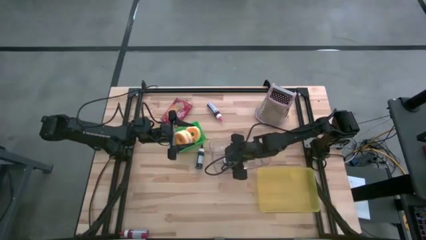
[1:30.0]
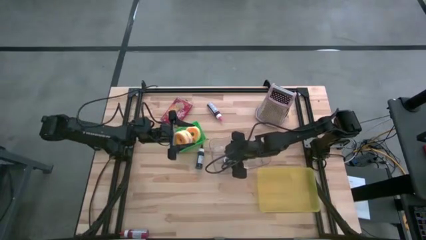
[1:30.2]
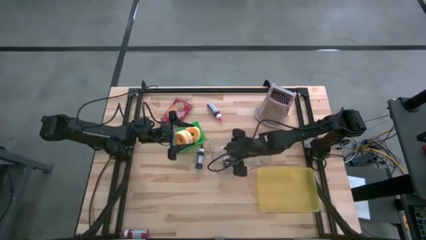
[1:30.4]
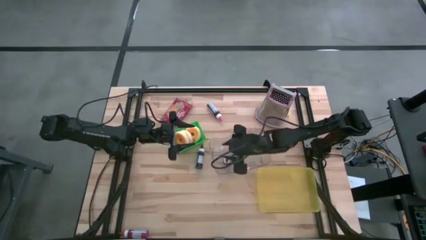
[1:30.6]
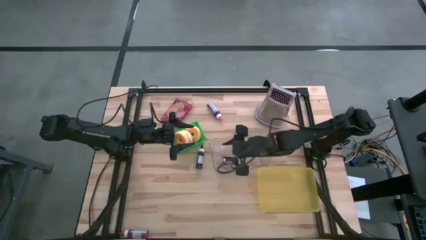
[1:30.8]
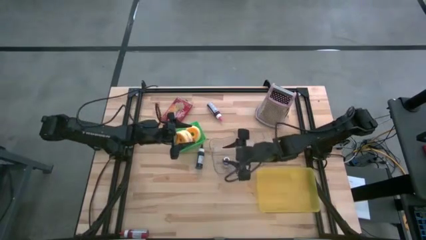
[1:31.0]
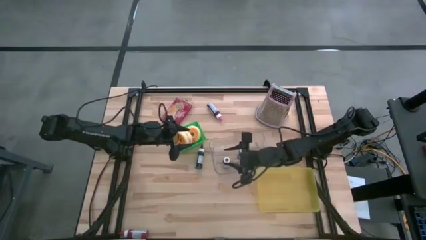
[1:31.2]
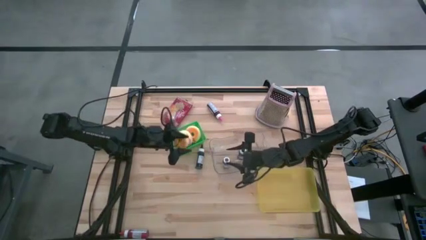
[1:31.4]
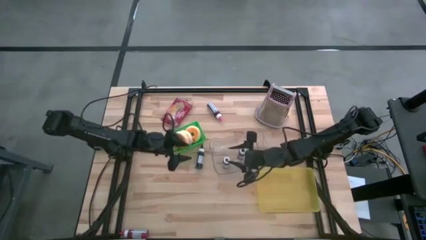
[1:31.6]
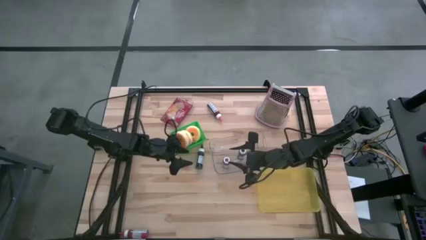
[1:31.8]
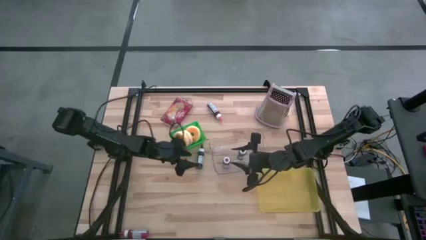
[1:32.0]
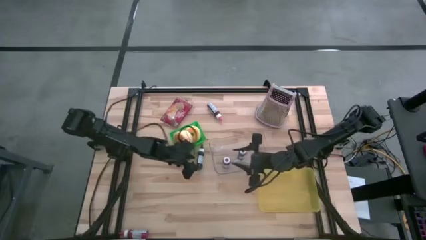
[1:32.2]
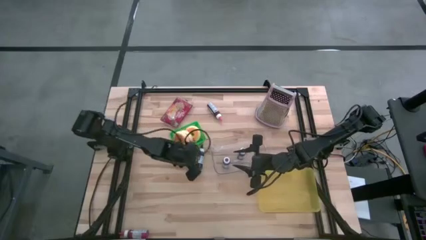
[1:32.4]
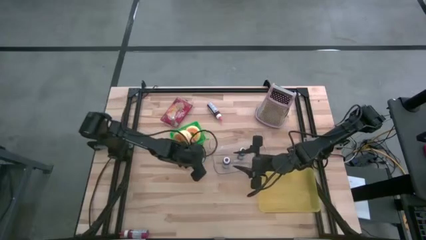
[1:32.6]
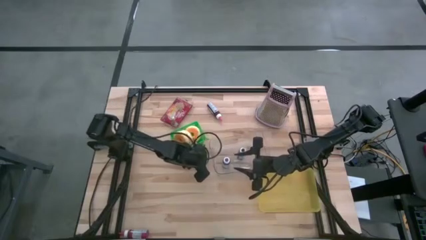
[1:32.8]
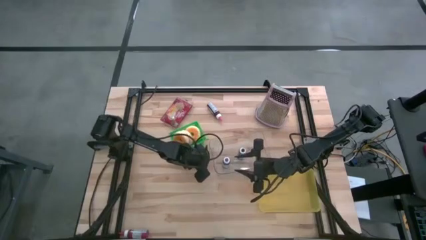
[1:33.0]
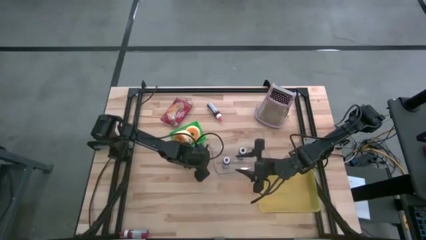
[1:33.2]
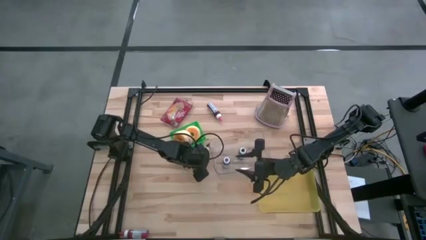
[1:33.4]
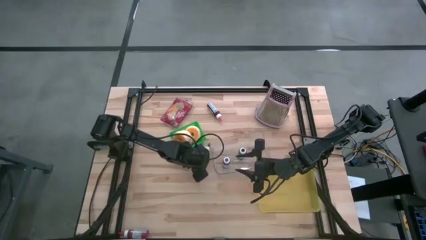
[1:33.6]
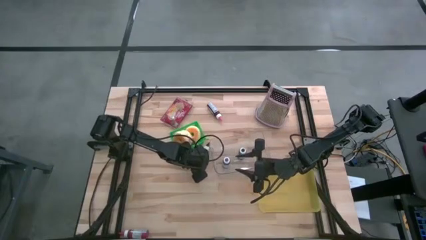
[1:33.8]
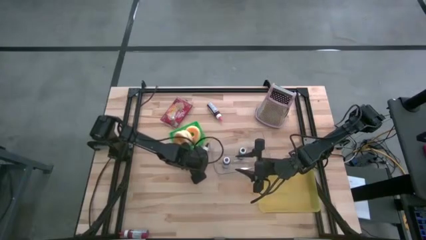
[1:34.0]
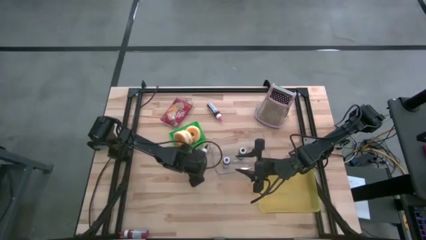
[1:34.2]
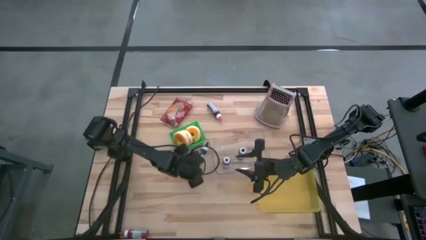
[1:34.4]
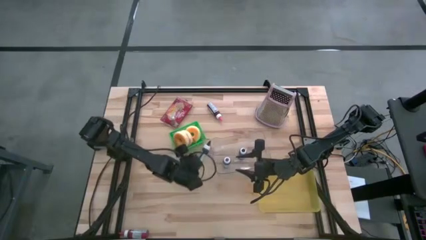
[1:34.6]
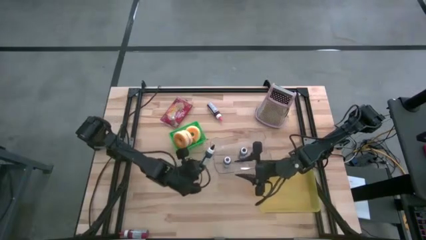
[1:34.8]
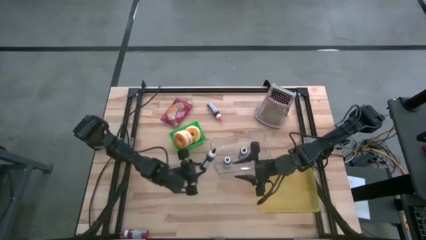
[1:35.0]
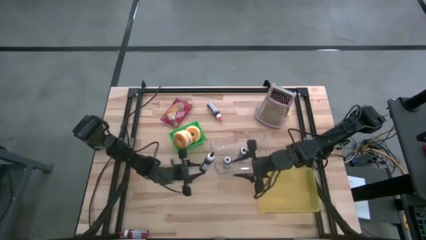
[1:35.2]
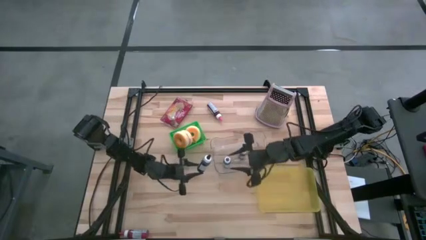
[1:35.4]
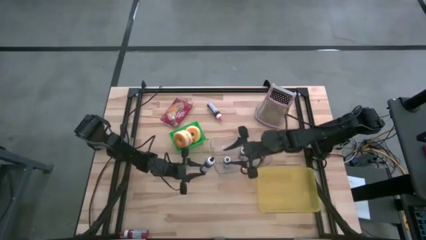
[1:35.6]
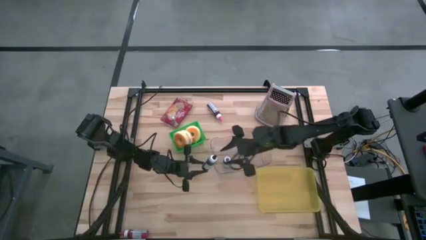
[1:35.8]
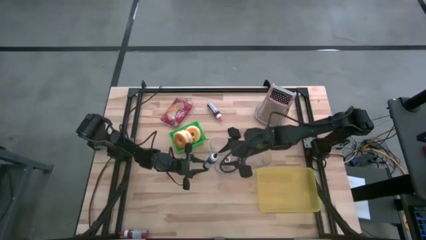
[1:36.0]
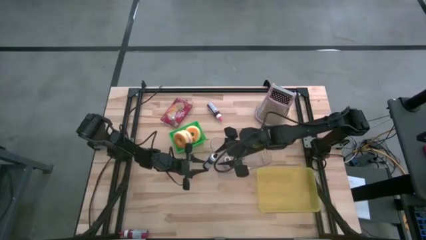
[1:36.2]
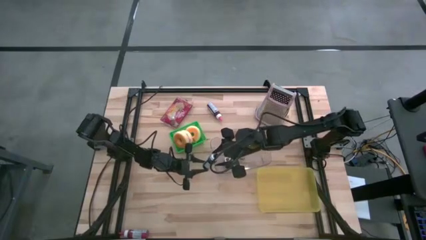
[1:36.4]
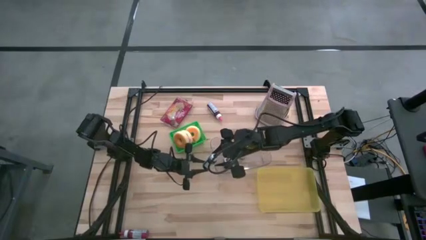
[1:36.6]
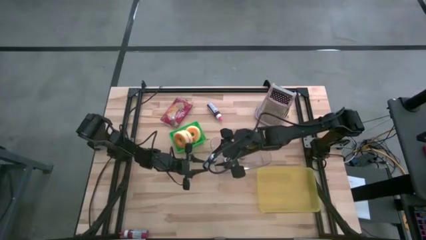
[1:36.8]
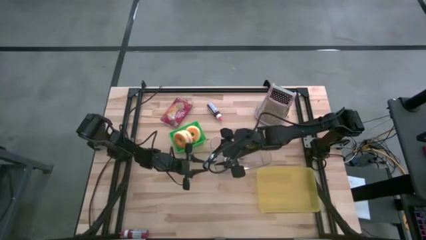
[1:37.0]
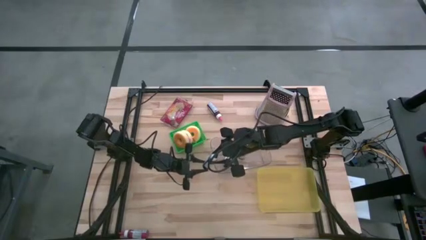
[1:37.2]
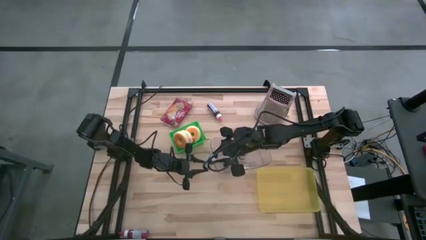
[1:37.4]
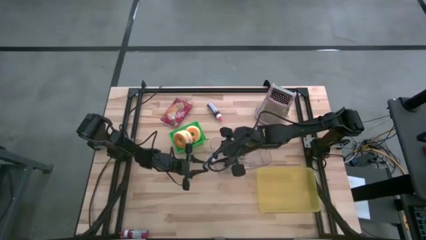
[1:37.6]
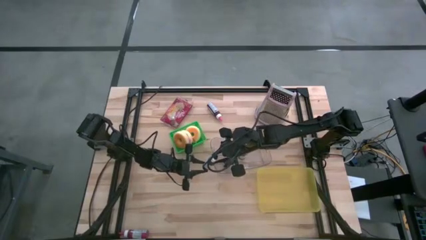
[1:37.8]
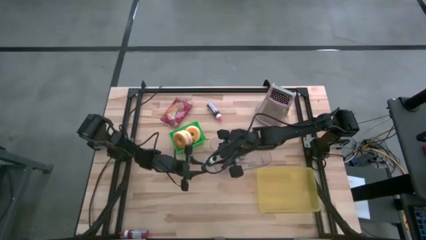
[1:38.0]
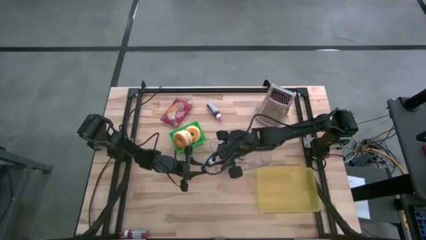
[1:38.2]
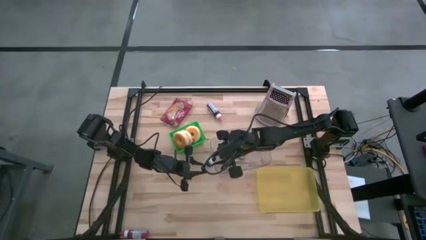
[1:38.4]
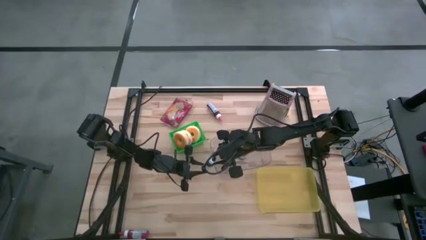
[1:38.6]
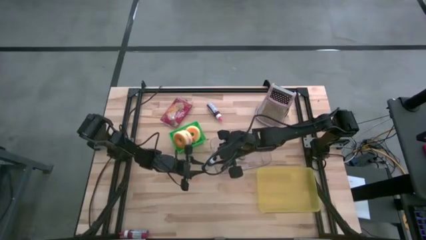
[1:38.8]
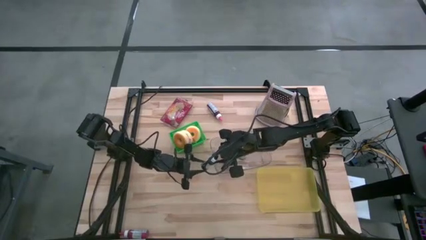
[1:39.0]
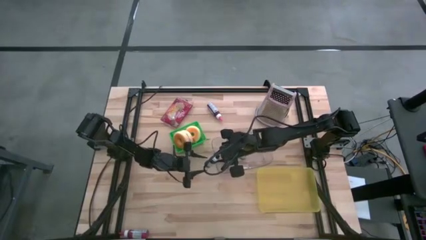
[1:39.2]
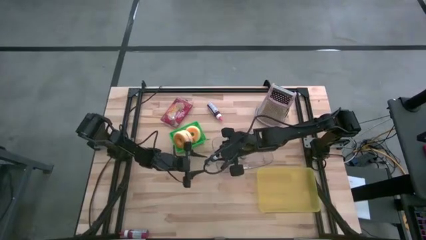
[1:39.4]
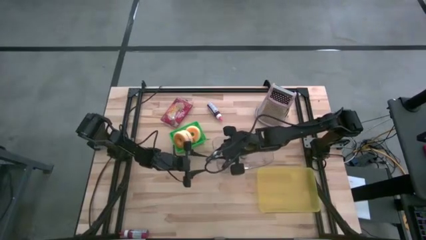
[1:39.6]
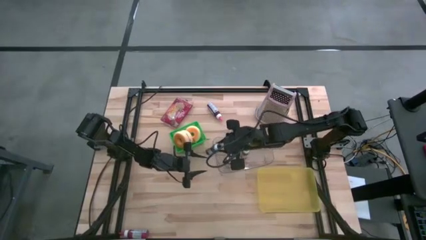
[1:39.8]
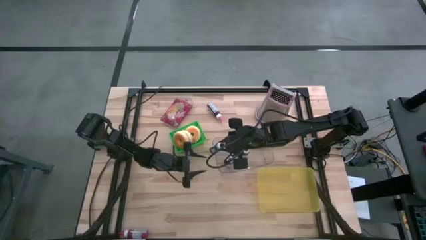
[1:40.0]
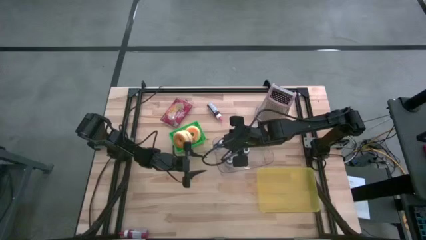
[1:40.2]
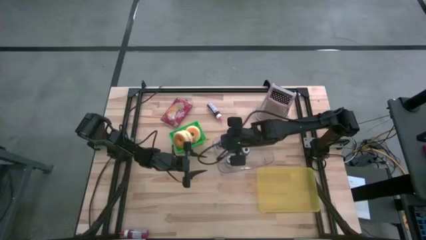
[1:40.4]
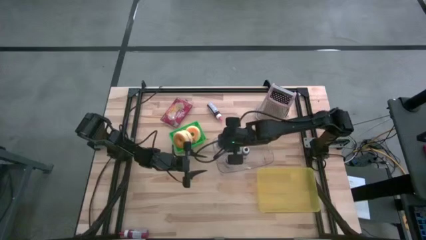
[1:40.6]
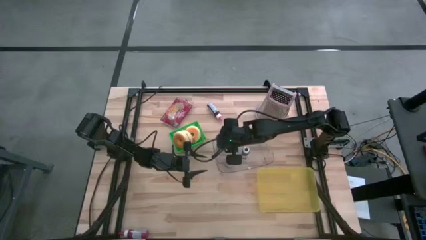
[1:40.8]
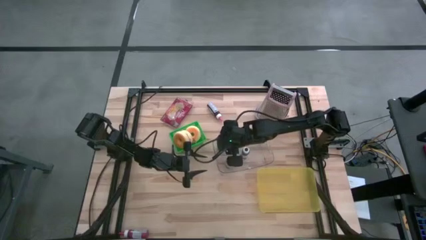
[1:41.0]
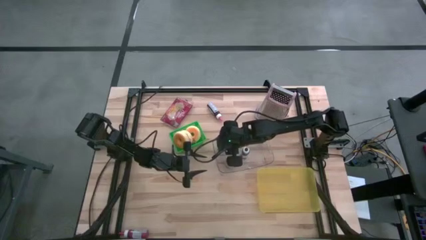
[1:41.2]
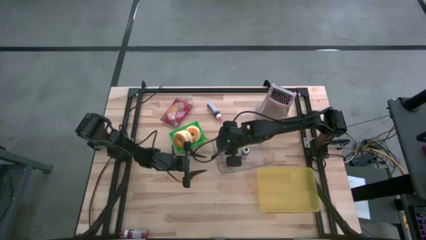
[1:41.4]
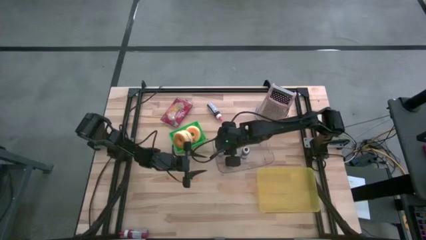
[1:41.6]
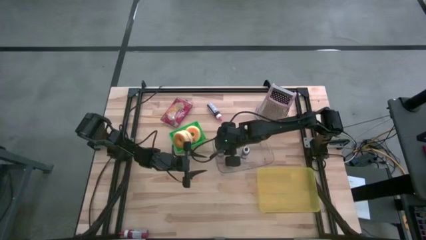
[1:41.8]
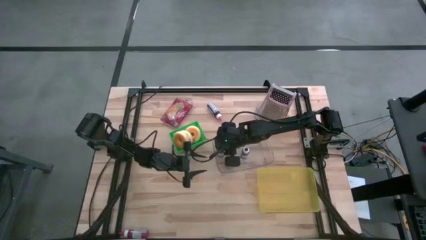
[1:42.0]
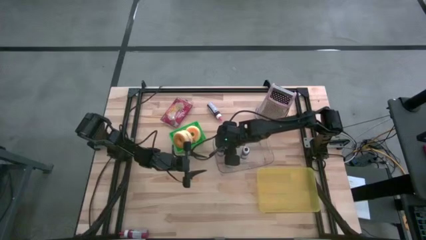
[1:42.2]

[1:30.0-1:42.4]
Task: Pick & Place Food Item
Put the black food coloring bottle into the transparent bin

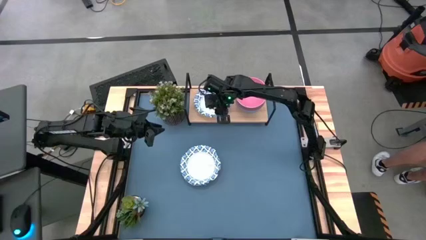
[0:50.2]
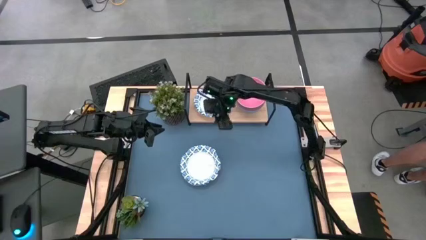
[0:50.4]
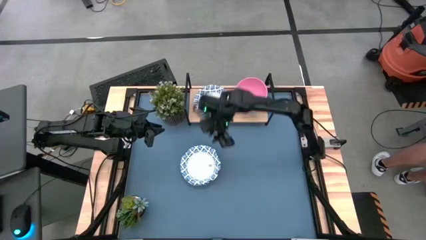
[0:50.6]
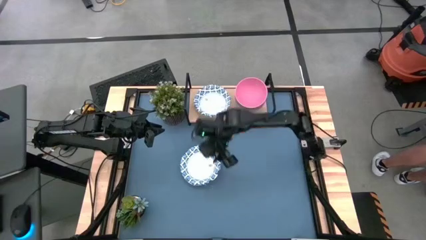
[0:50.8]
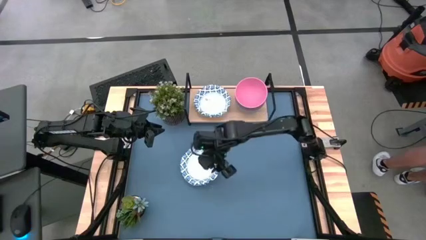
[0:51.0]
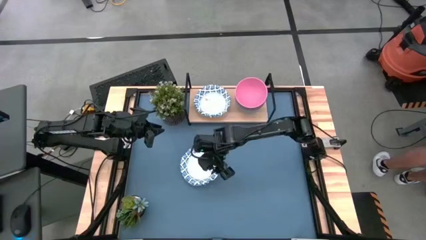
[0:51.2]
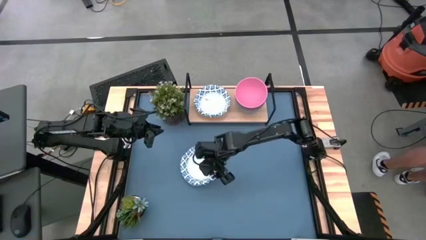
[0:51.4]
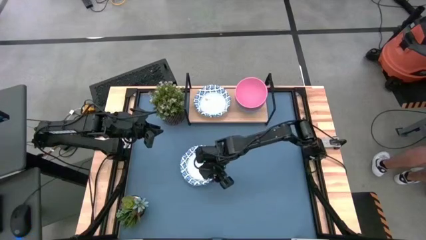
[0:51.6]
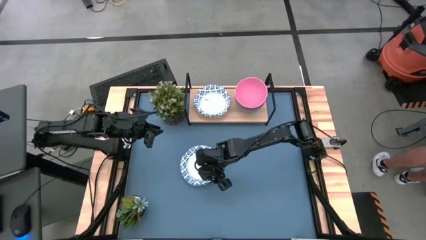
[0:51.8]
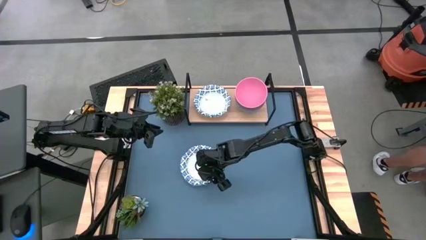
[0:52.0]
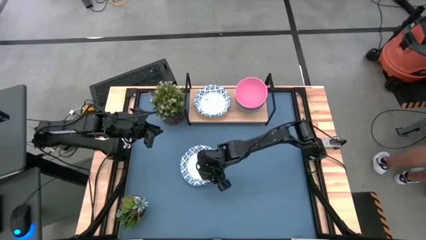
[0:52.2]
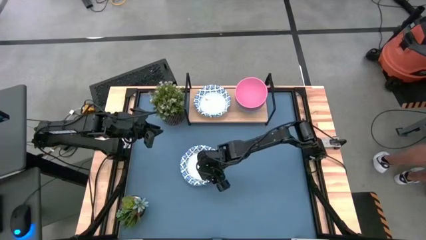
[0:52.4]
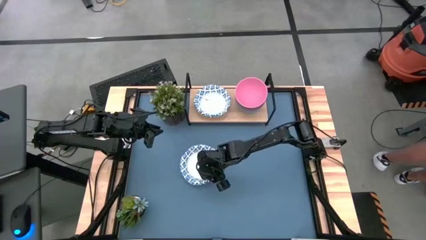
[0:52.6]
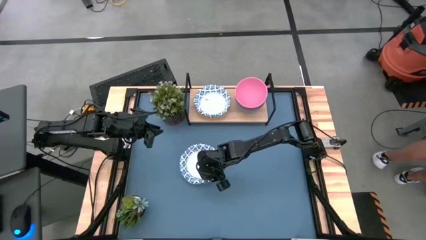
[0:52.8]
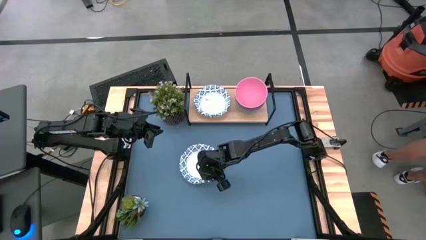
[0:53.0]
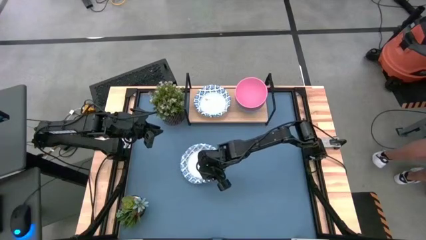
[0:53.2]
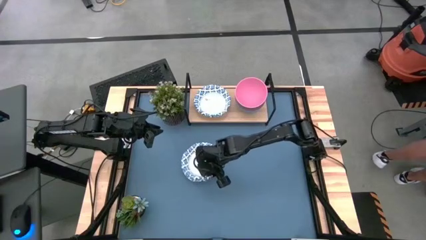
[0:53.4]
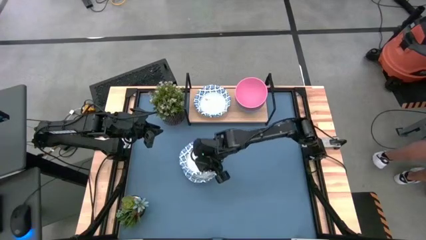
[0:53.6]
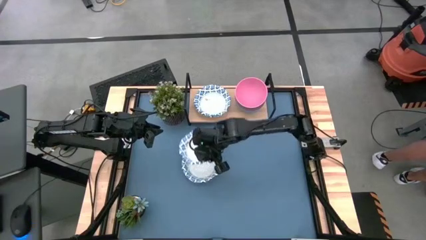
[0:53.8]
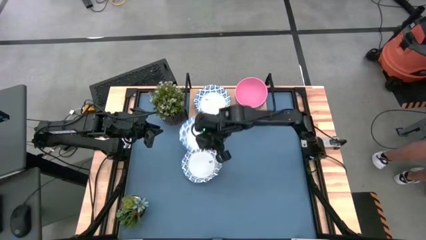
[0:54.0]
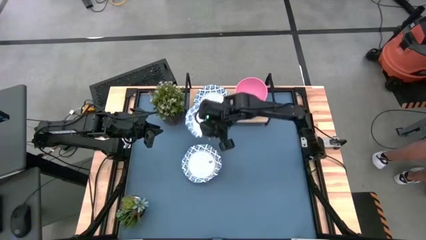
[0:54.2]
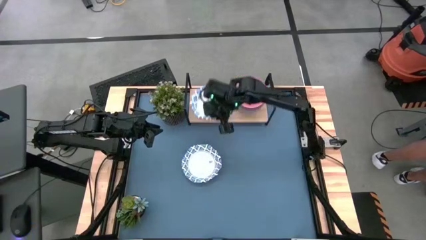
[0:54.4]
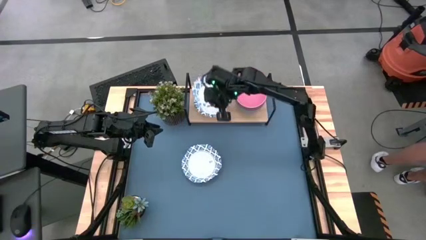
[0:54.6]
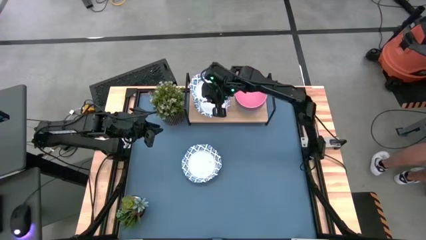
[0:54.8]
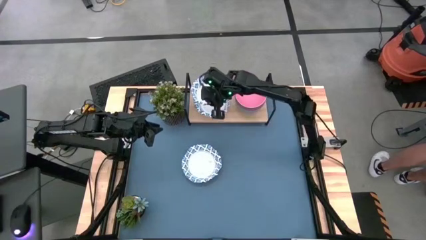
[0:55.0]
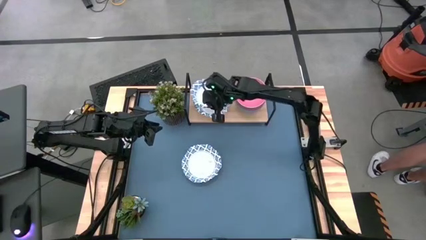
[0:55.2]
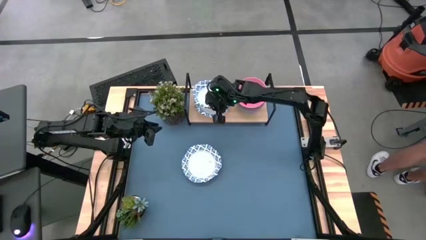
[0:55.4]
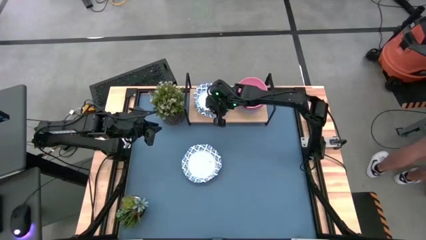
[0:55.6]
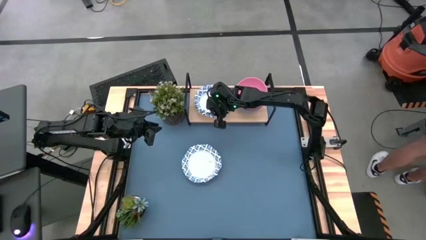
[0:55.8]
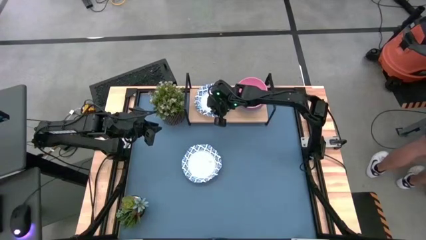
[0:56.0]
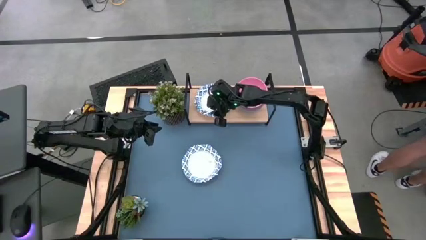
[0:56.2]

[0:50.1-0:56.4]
Task: Place and stack bowls onto a shelf
Stack the blue patterned bowl on top of the other blue patterned bowl on the shelf
